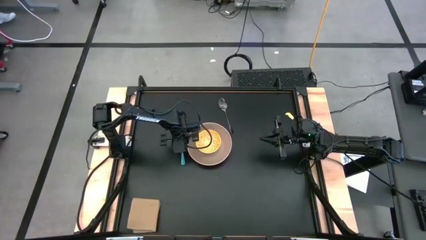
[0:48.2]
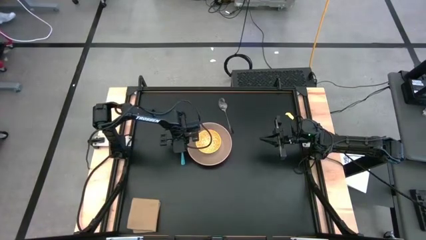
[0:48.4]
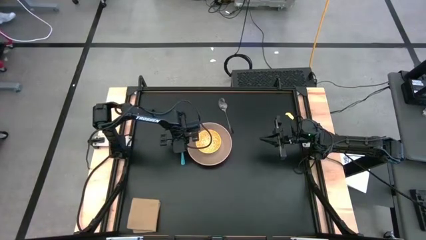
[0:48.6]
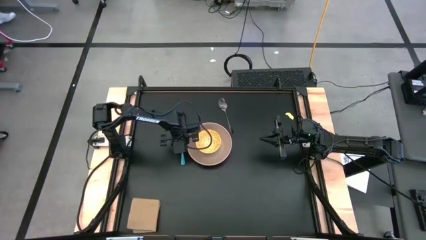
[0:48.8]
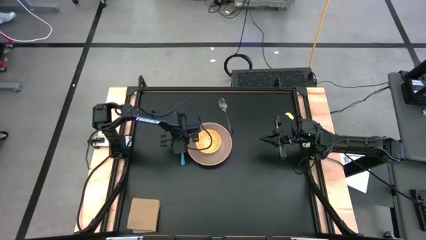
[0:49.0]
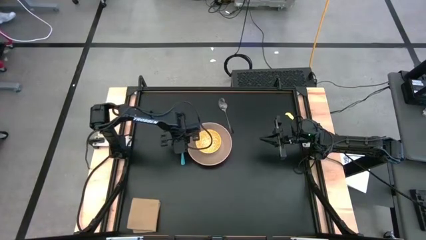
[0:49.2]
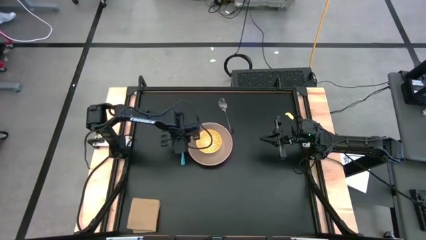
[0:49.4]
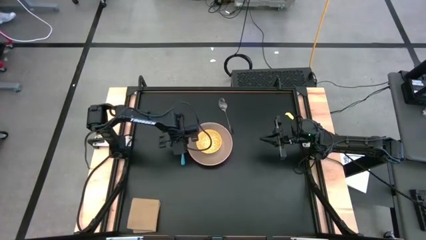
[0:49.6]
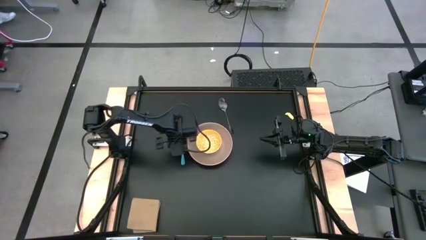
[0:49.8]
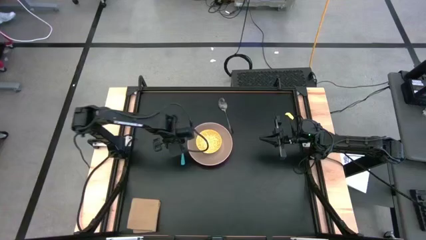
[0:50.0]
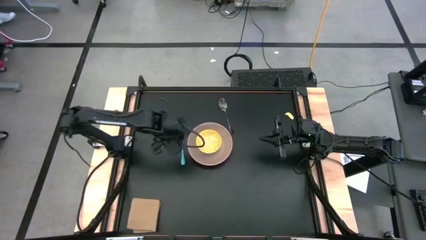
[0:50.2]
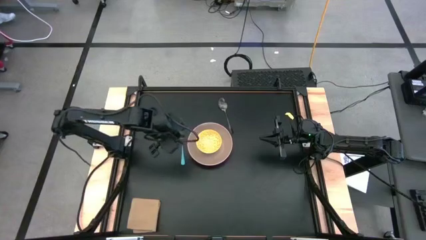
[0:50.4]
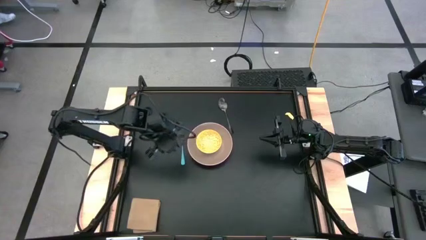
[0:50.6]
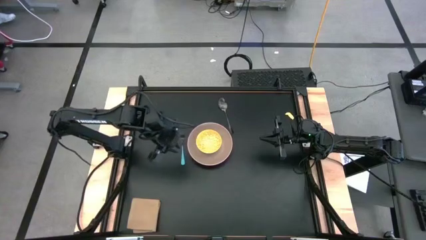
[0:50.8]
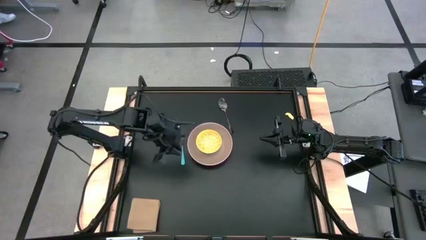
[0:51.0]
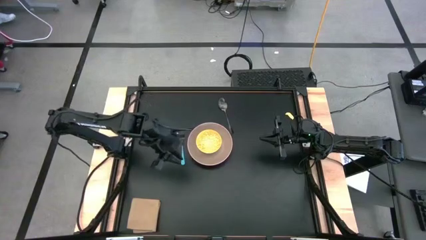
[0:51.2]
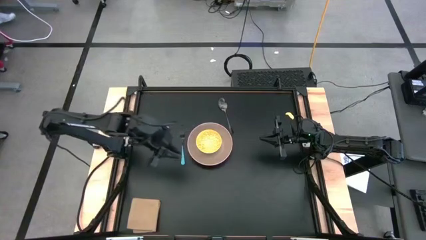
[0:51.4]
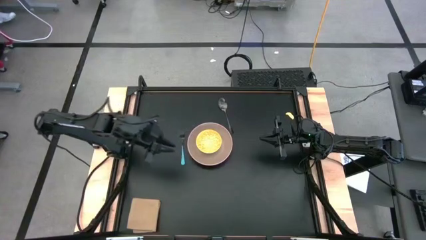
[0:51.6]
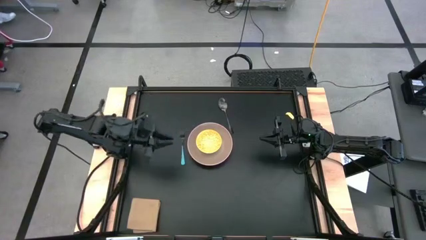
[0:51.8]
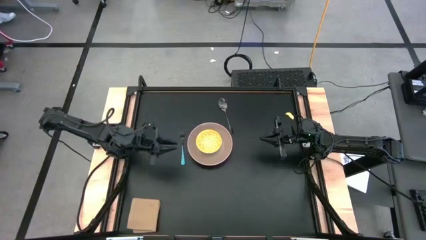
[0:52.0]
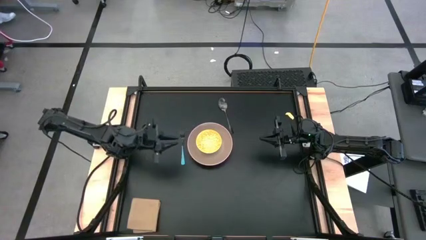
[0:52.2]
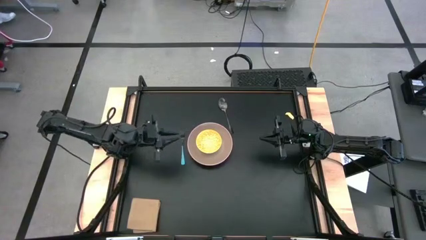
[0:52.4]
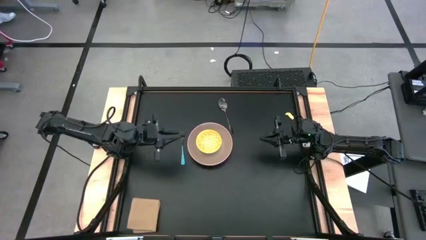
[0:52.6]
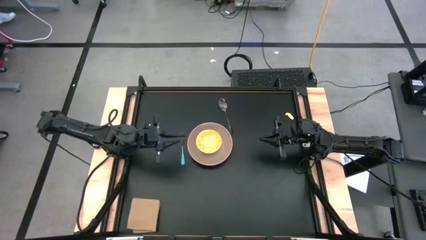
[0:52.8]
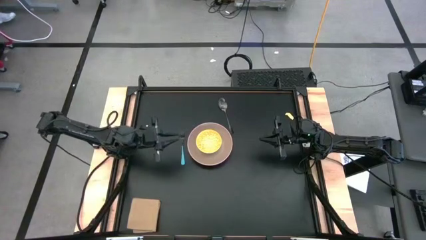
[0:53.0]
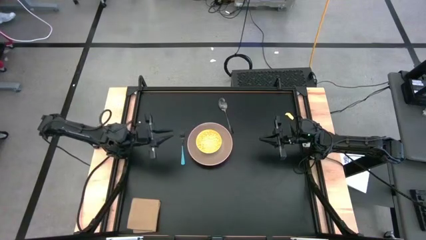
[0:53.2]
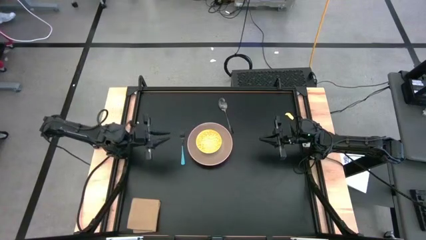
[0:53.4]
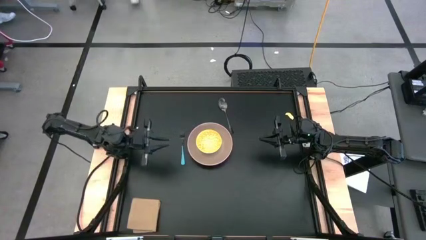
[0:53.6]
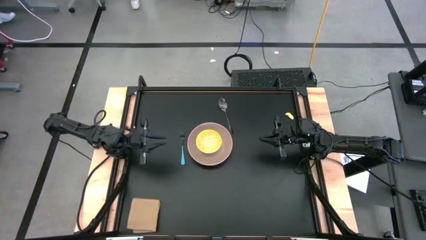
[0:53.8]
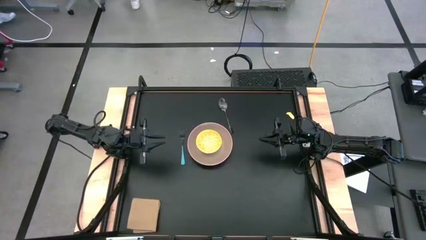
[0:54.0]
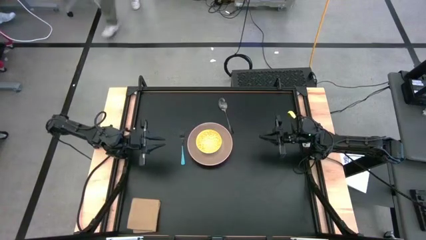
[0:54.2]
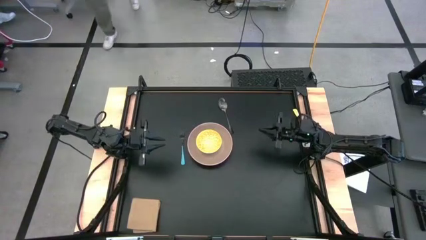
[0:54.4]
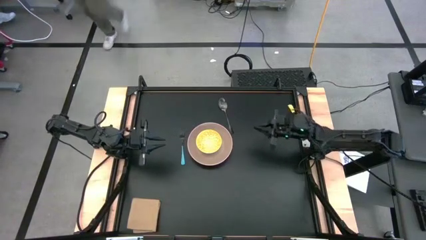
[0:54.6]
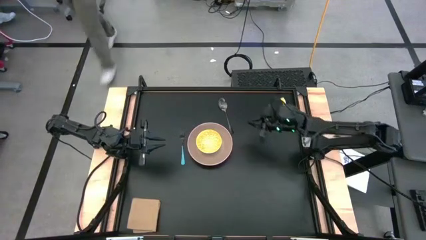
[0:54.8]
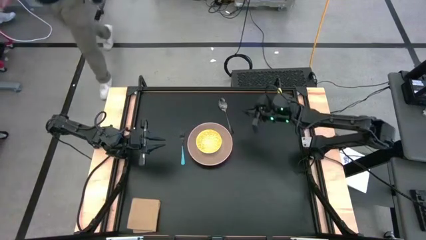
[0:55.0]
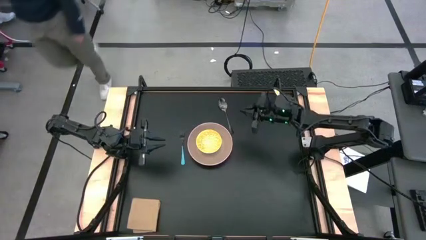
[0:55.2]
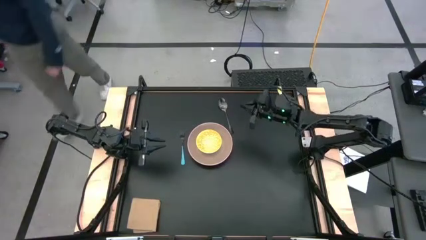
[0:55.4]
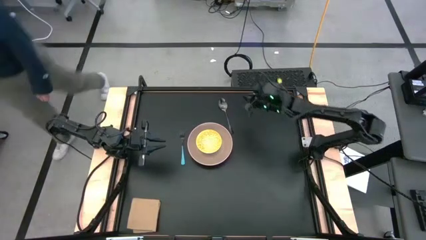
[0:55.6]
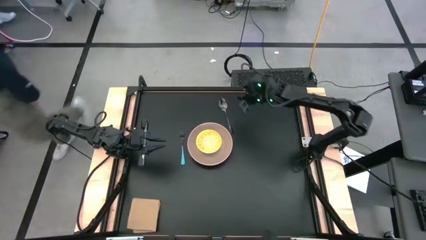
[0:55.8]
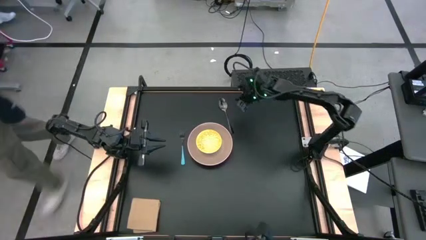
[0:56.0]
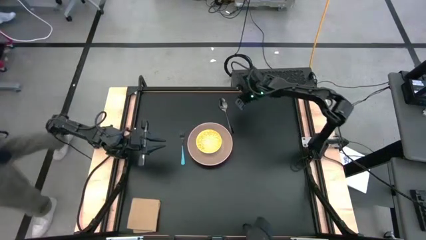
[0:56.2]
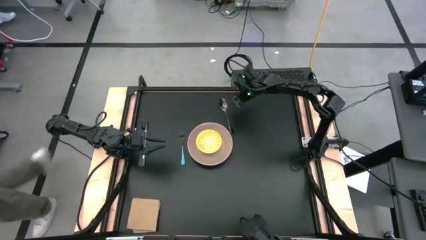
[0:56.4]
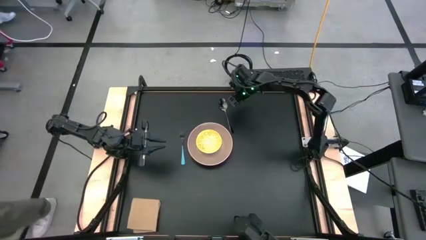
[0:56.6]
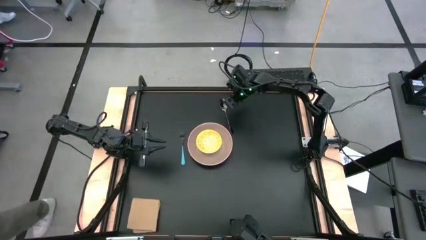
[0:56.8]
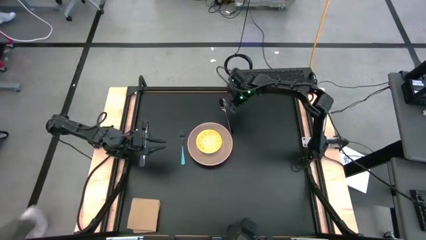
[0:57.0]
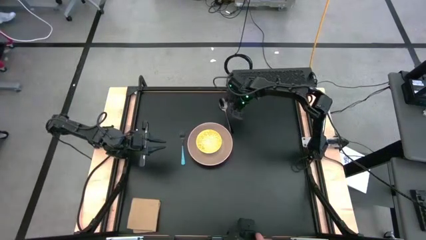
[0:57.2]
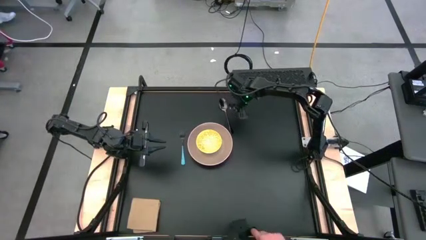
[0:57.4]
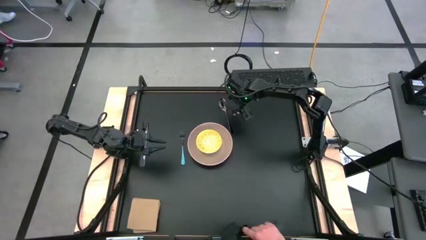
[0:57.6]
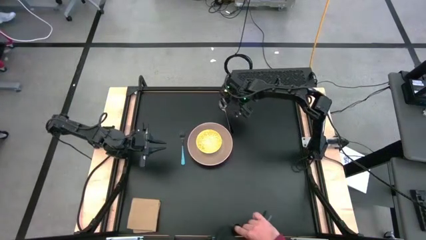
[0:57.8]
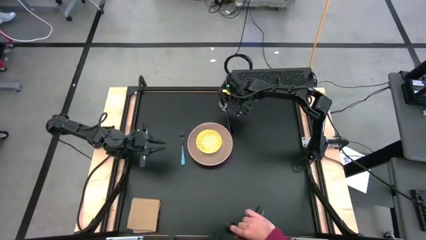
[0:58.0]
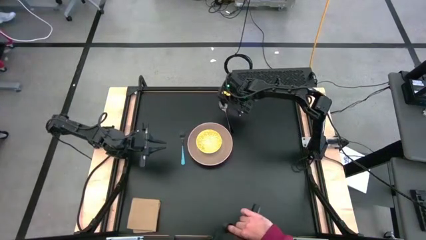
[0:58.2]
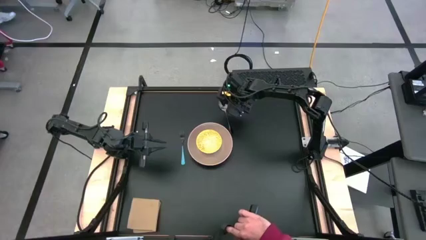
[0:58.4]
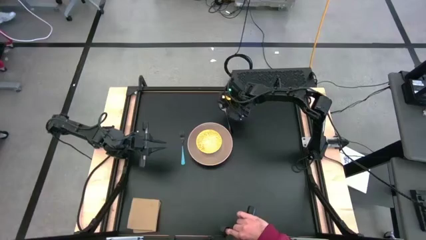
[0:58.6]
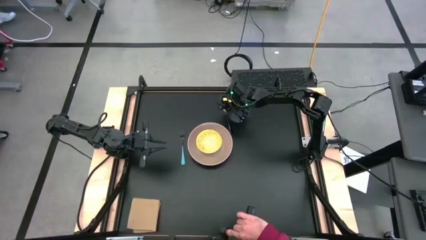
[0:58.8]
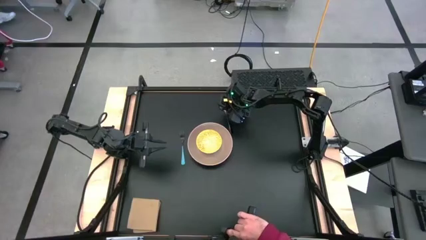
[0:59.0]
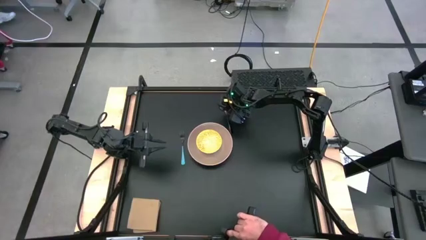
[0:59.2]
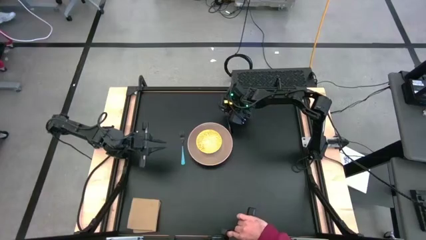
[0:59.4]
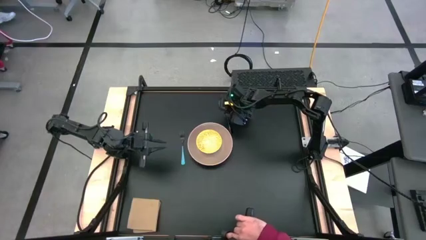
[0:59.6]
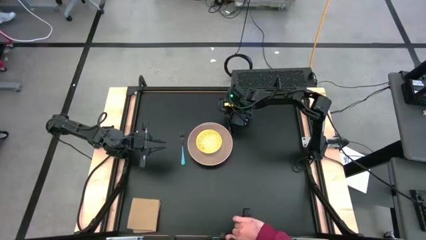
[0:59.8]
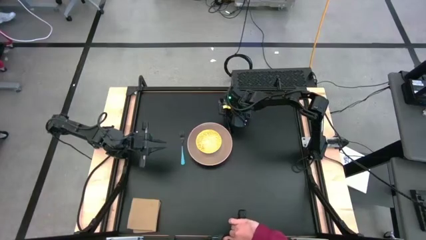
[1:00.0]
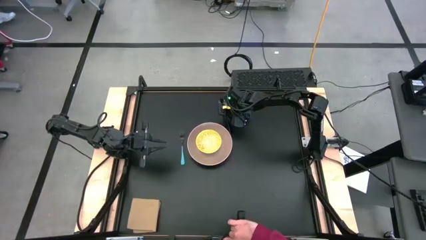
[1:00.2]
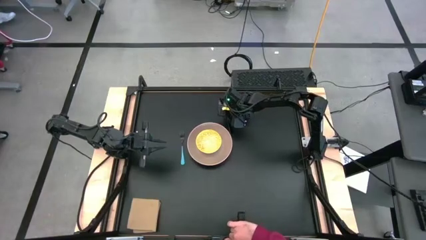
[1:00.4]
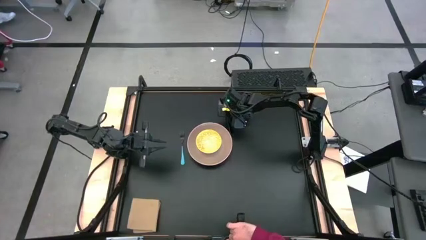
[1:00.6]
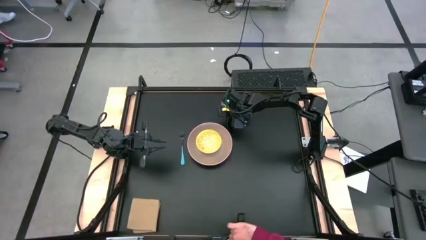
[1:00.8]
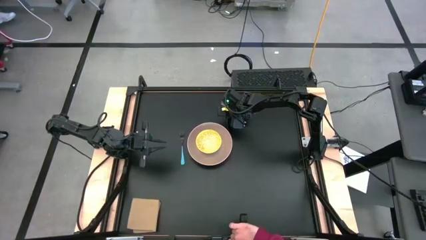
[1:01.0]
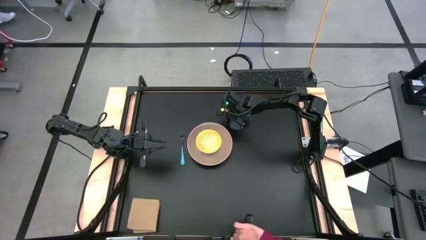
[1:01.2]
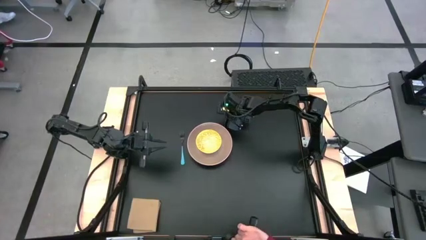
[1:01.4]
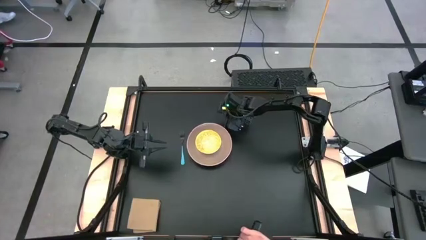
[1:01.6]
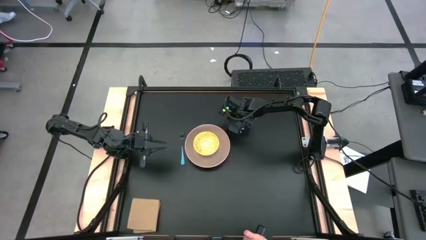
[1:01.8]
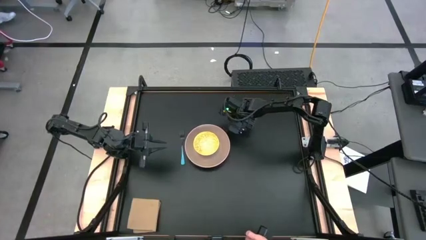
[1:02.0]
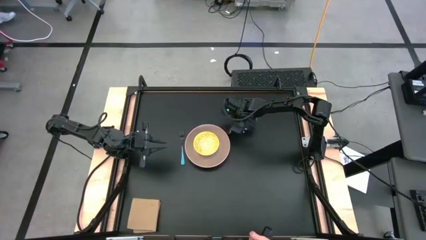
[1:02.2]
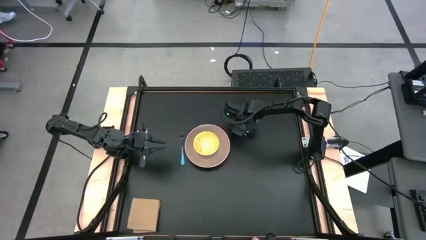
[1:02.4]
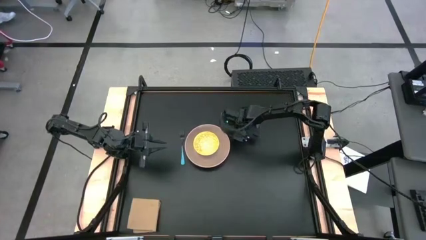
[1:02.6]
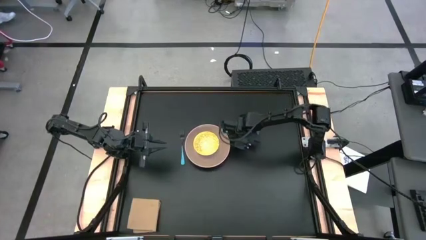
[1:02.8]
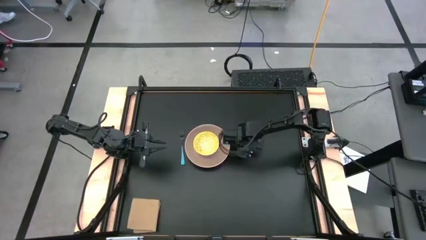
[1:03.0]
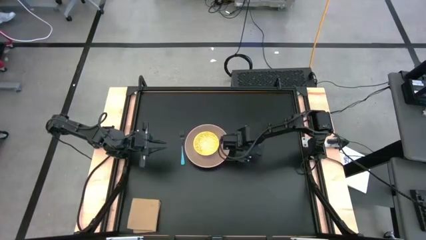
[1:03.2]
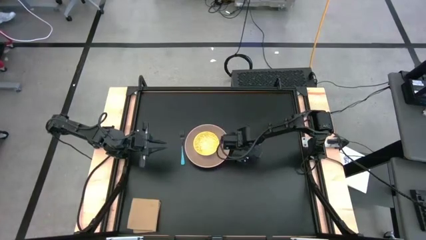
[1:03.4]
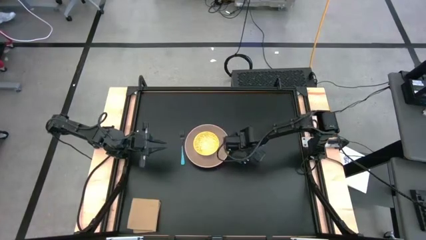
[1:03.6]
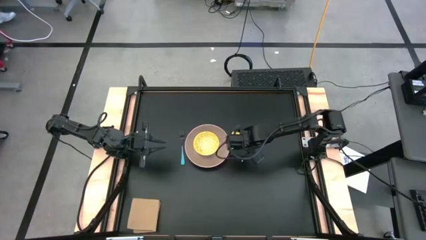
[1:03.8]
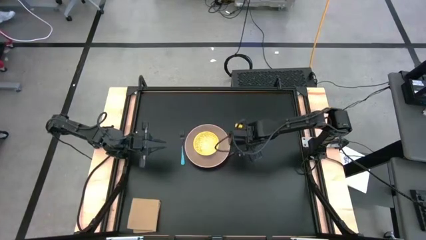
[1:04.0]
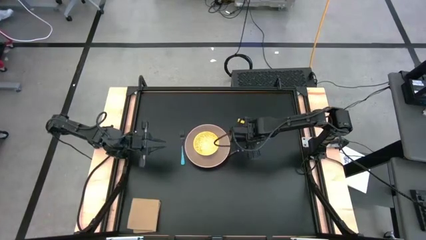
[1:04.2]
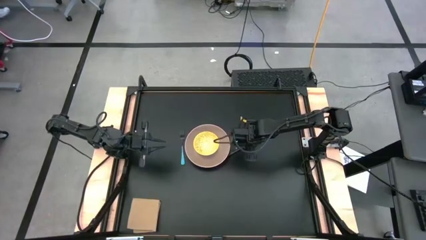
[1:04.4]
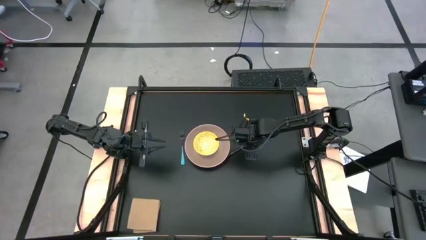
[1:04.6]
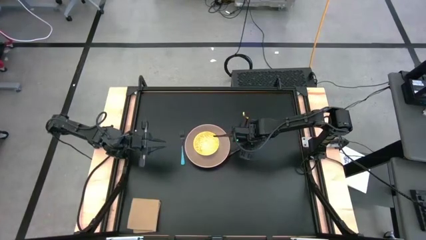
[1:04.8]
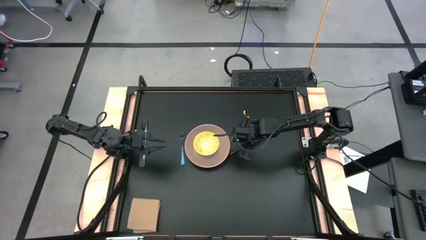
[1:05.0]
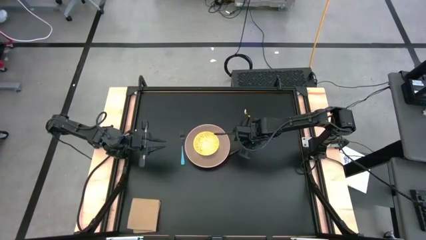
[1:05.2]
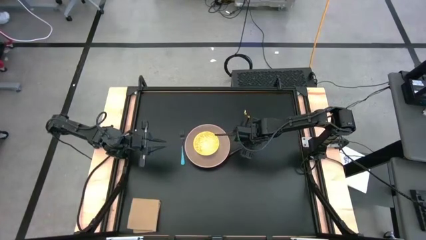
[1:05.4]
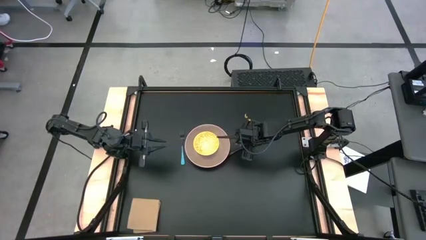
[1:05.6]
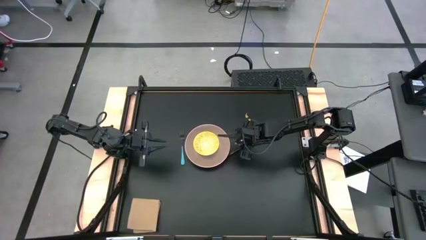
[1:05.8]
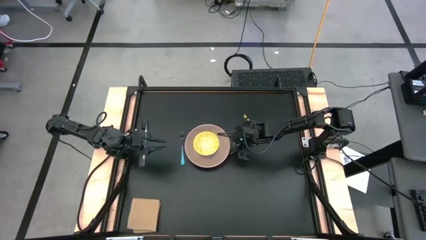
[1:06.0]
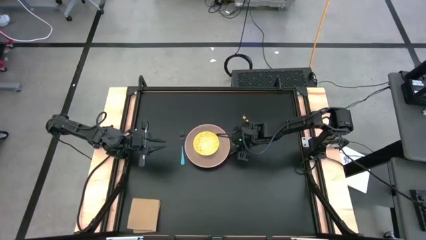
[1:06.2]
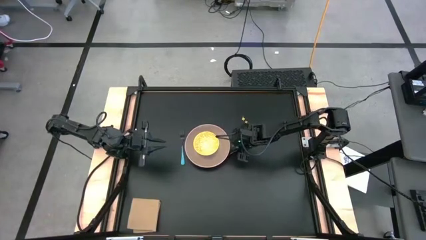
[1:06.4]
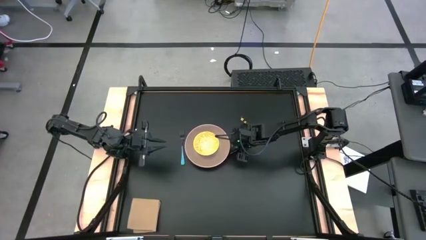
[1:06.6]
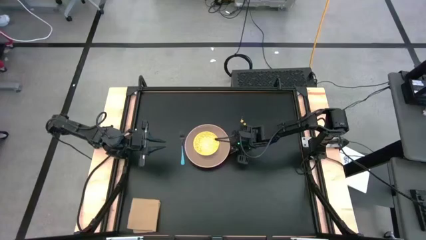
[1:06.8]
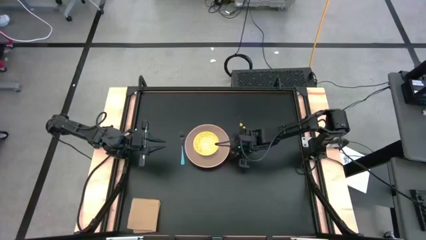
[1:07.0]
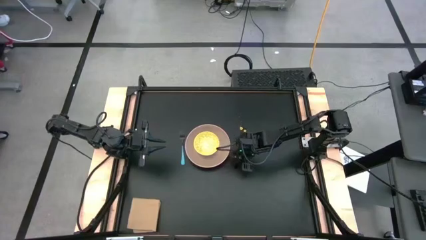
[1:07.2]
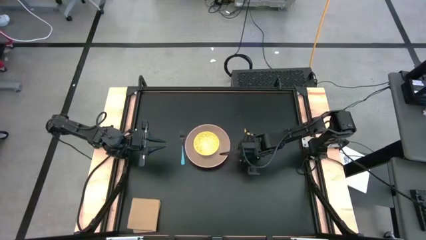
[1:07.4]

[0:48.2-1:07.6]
Task: Set table place
Adjust the spoon
